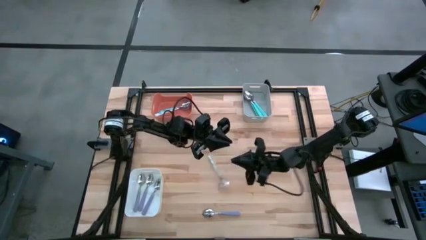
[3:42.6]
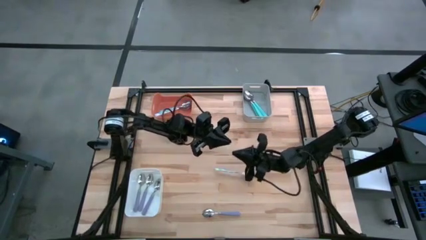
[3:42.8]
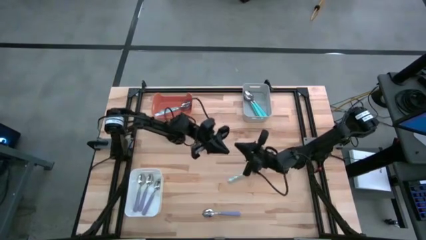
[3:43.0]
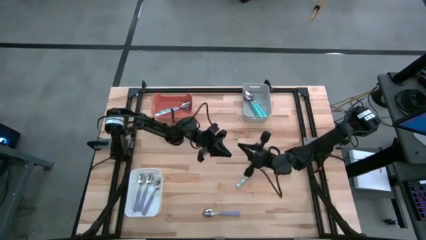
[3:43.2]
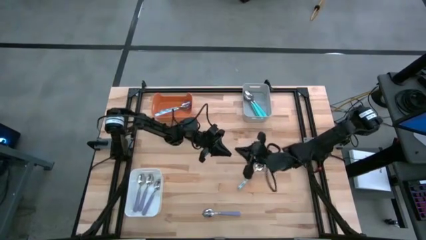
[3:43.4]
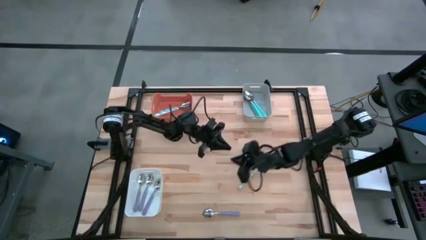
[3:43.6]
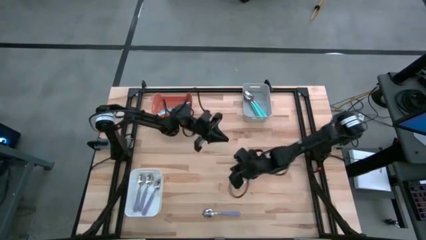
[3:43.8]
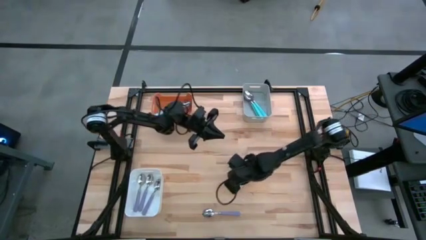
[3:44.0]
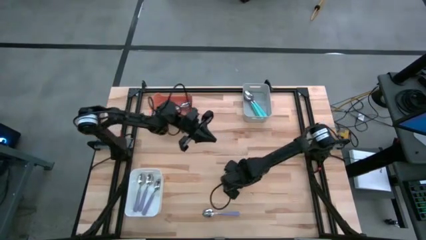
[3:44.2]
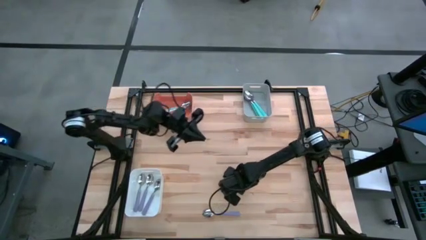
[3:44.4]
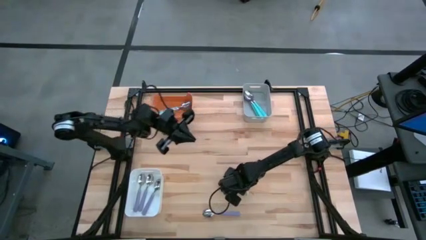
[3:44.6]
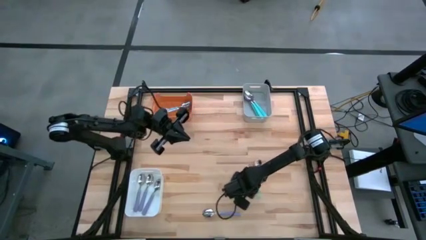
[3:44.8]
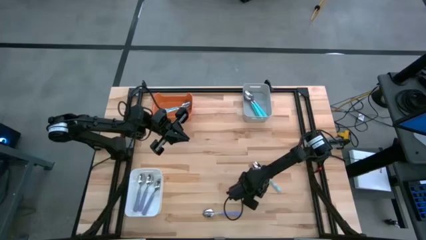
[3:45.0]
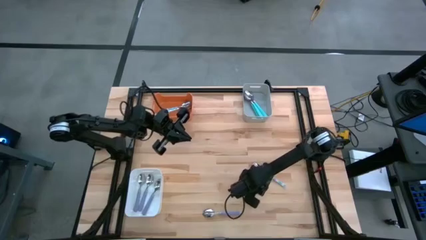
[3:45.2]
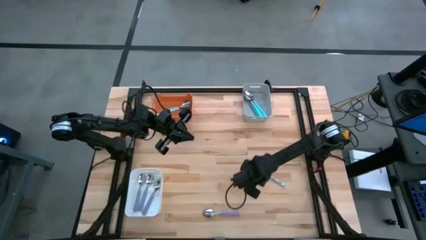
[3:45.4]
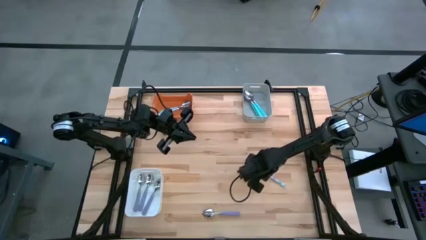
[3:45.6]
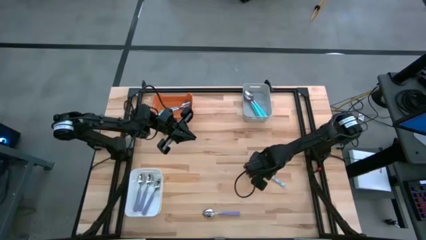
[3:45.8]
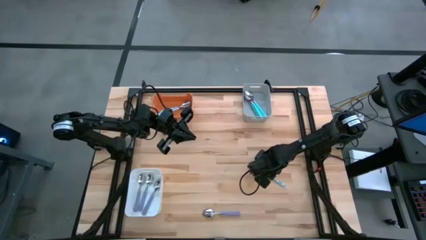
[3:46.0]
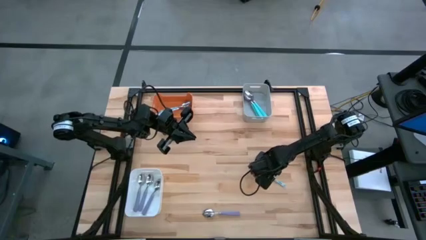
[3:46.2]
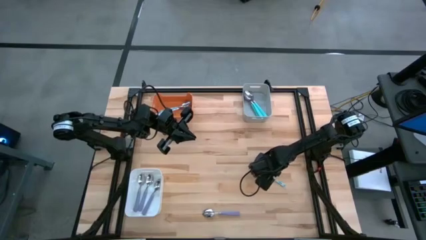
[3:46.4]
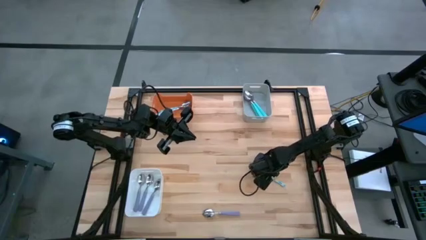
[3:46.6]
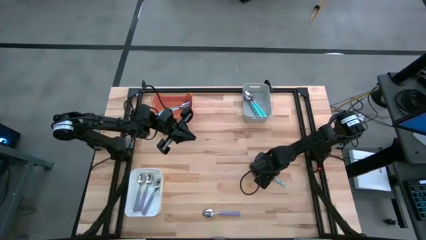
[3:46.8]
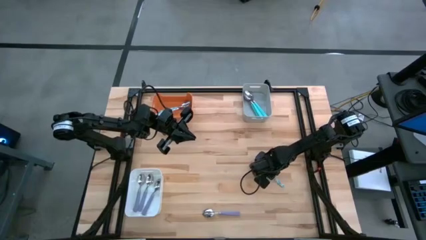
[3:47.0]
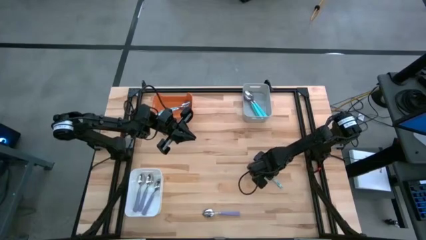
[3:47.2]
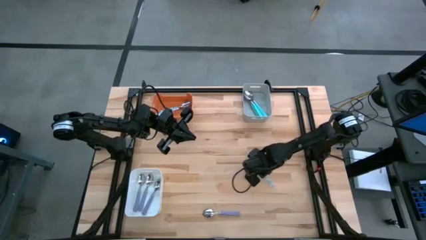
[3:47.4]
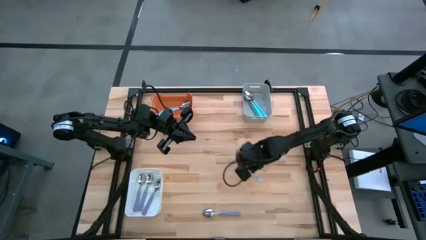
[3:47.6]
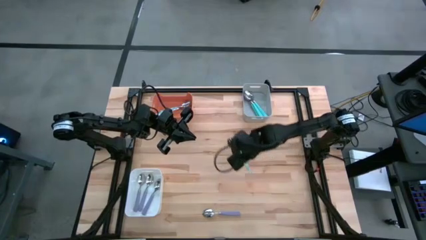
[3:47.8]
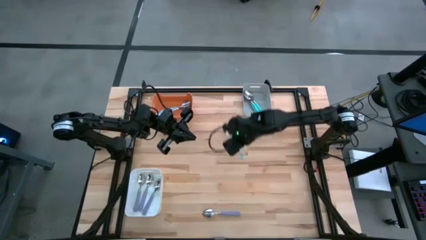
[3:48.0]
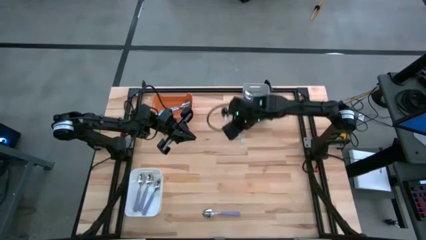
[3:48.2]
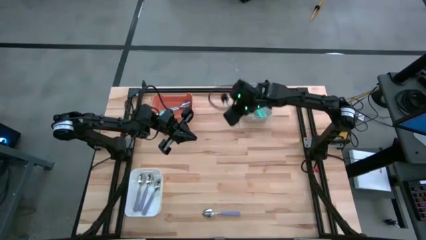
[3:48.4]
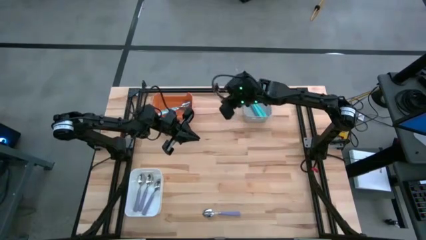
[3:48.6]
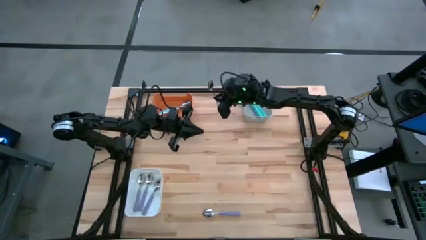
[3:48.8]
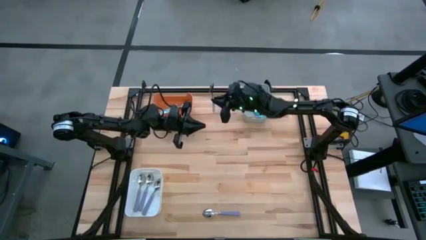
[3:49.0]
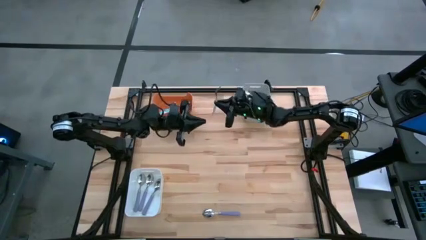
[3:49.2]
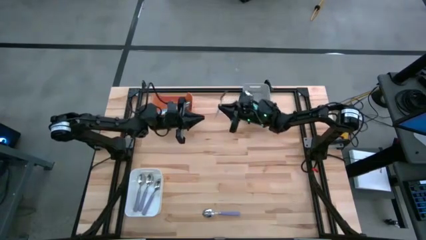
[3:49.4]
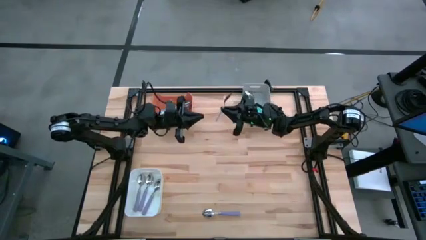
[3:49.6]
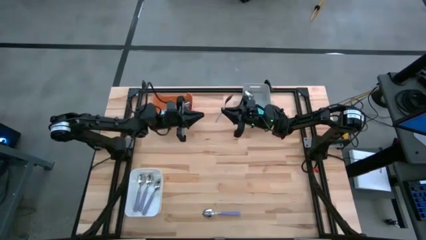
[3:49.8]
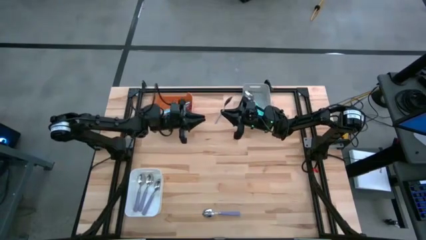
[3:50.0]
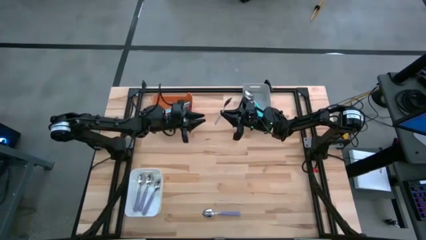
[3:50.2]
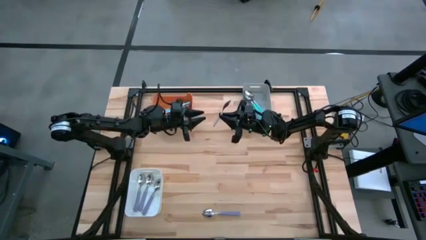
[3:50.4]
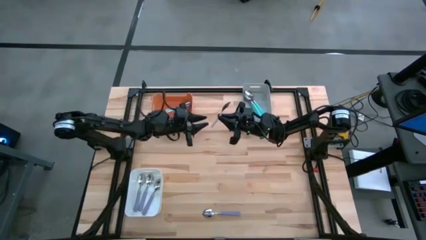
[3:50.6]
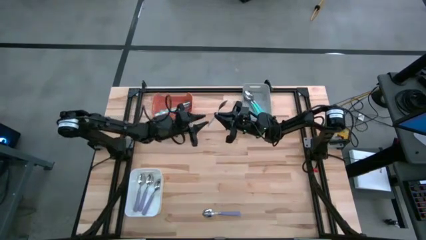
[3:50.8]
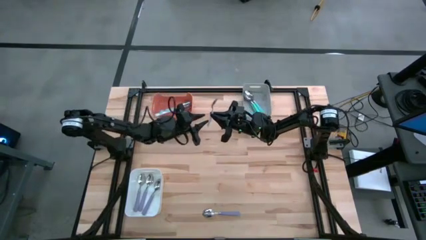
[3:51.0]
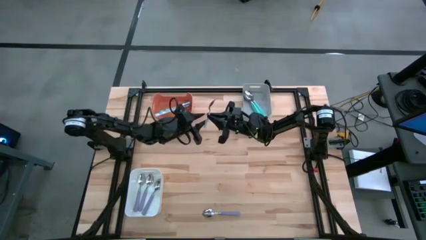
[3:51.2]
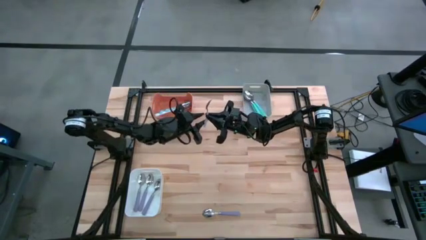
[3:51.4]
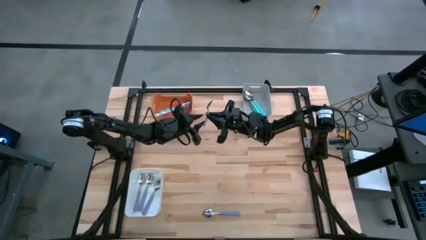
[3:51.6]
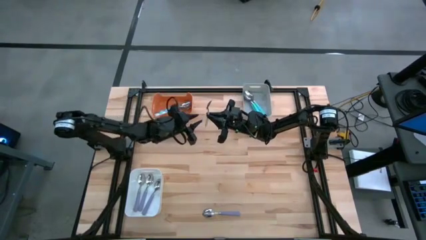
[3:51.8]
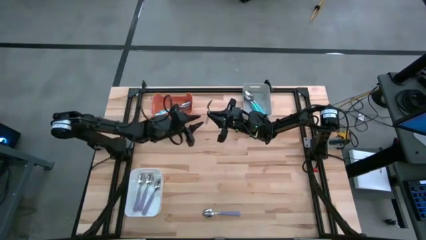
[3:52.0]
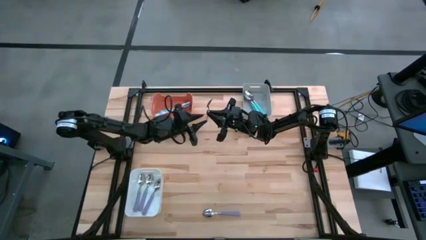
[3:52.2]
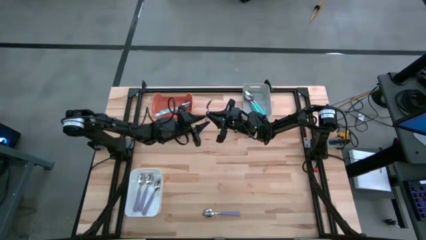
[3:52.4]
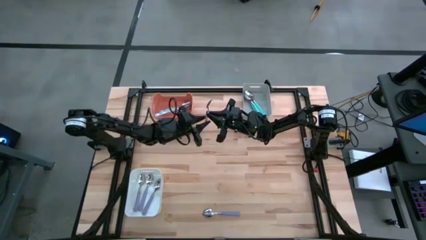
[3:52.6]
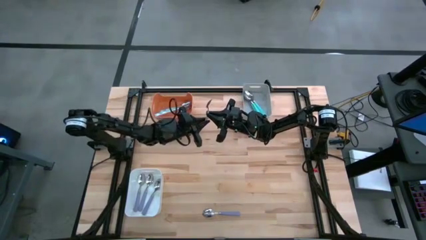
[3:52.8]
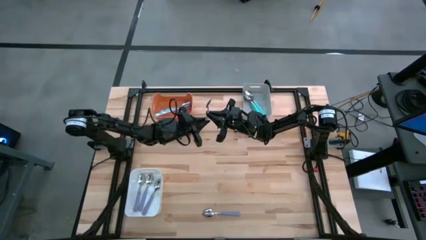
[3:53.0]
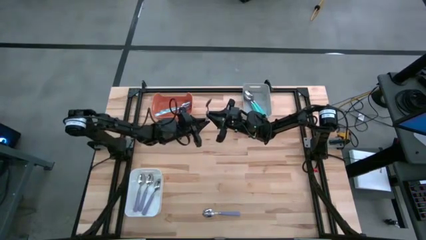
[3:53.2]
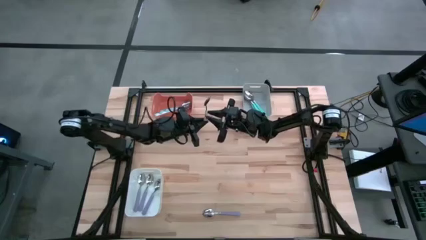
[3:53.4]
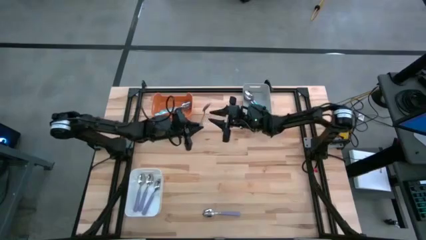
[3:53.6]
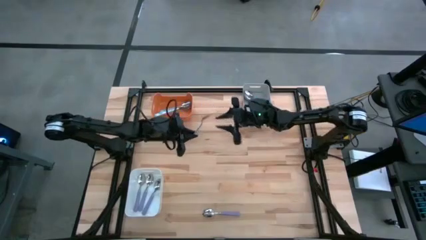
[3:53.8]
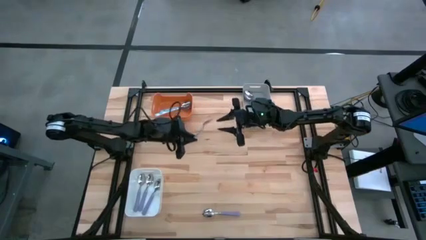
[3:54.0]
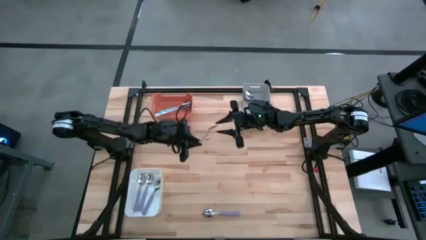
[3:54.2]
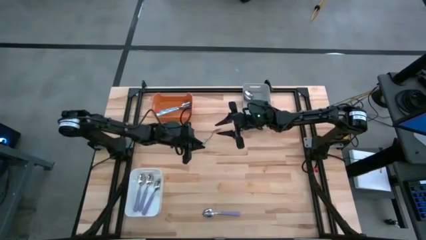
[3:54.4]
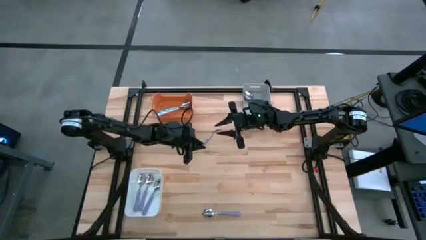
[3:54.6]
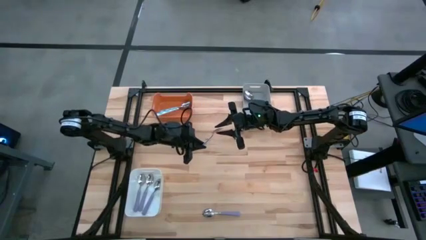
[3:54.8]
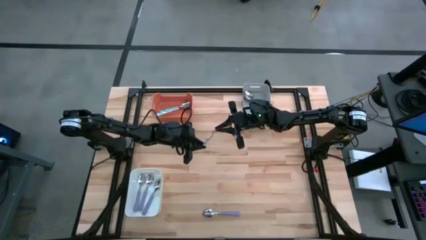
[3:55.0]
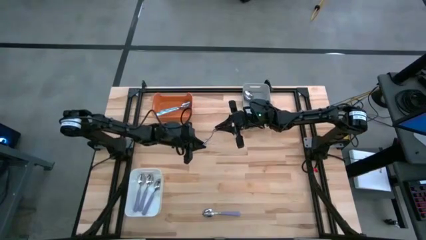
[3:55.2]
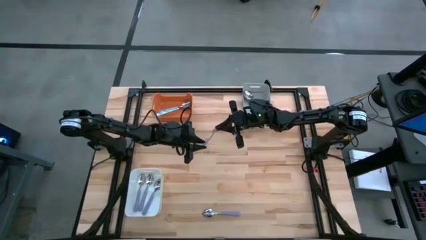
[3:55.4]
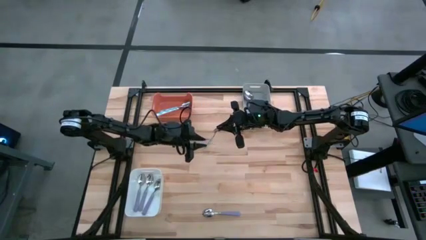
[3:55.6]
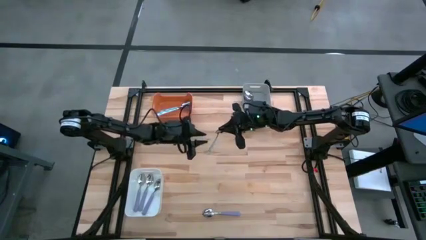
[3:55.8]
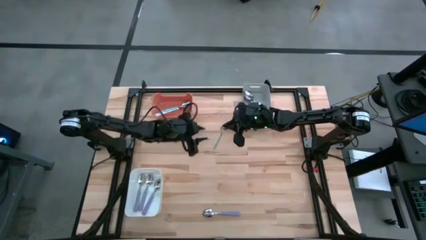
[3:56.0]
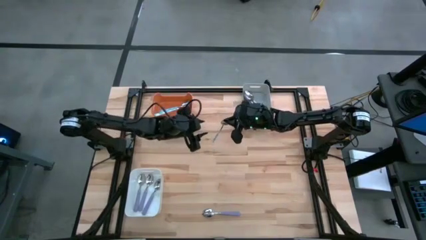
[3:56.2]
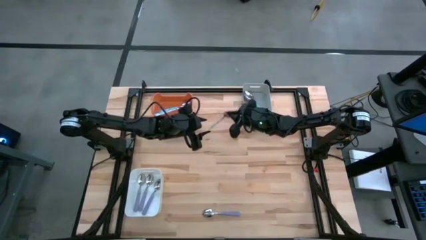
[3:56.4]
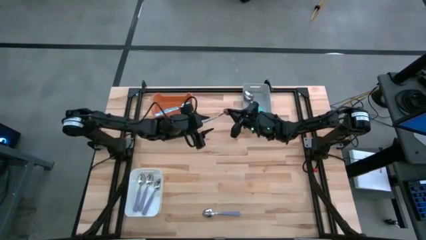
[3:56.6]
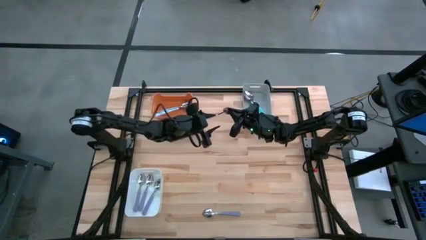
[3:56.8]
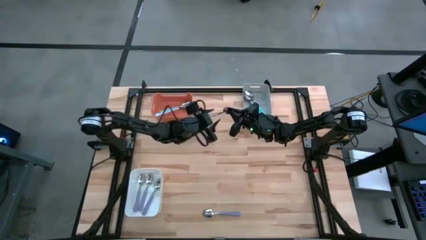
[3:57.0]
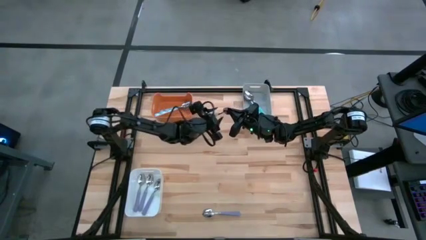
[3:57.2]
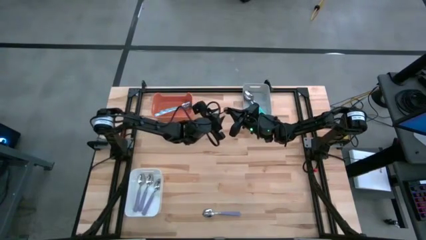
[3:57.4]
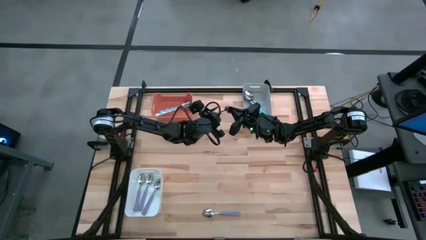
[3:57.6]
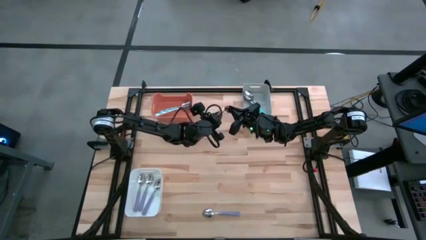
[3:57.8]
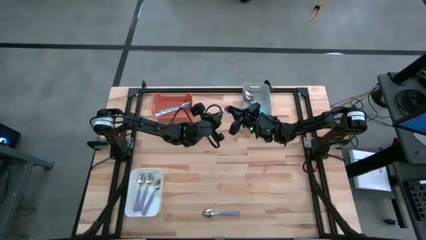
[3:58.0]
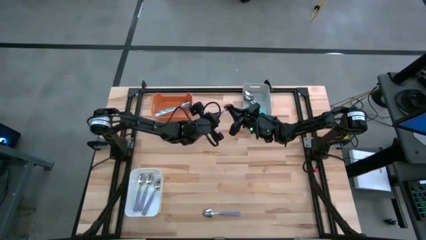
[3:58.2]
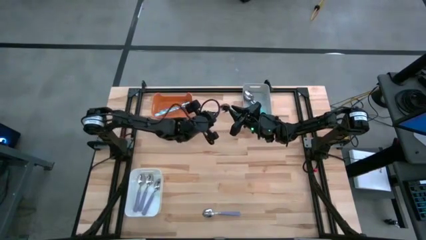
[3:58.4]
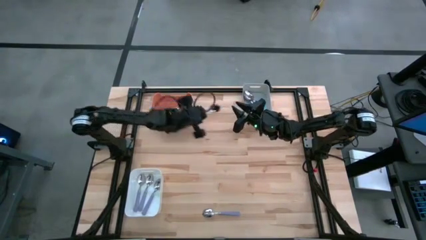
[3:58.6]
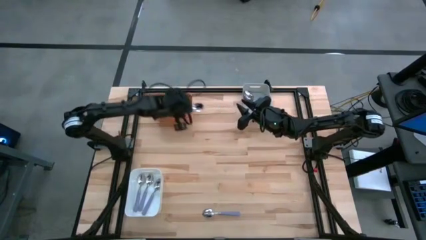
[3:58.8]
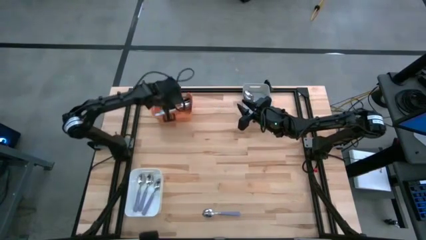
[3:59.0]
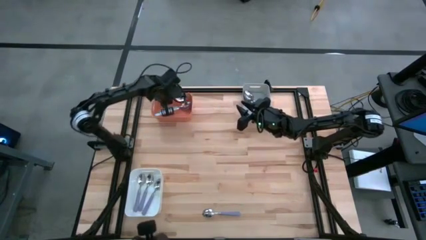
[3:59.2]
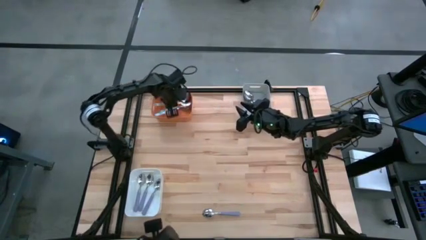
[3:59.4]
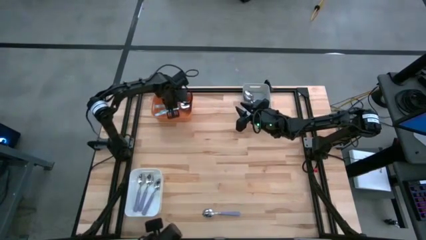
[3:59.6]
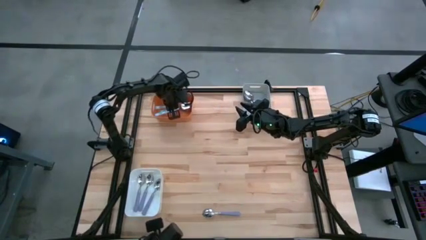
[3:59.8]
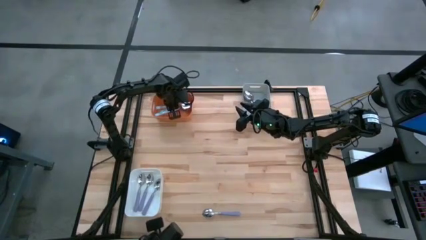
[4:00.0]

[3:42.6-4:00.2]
Task: Sort silverware by color (type)
Put the blue patterned spoon into the orange bin
